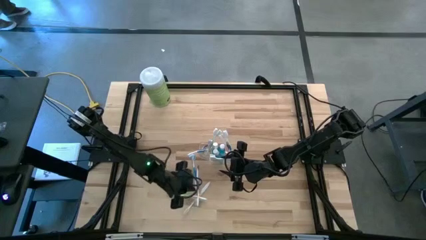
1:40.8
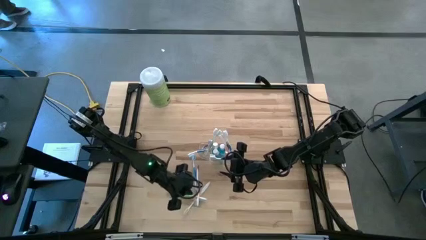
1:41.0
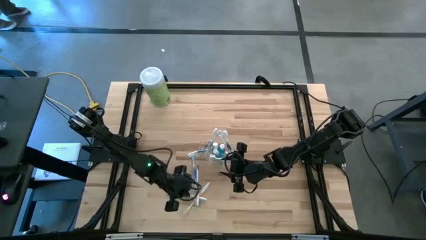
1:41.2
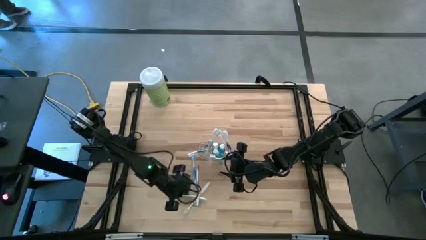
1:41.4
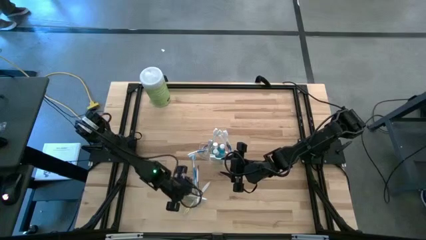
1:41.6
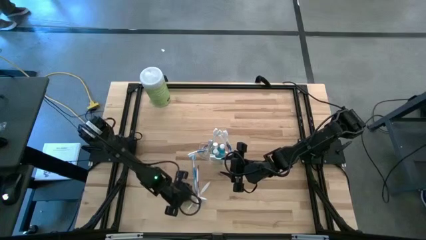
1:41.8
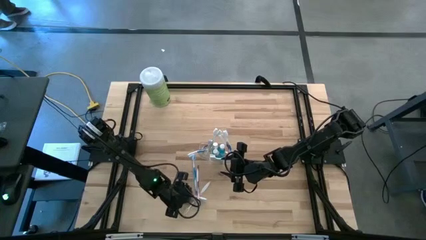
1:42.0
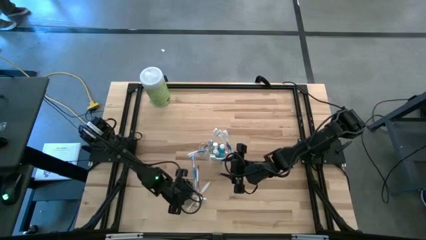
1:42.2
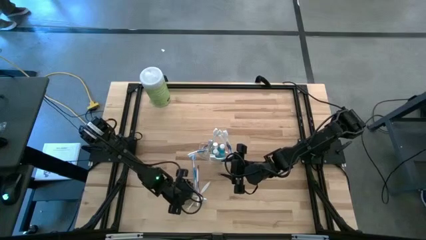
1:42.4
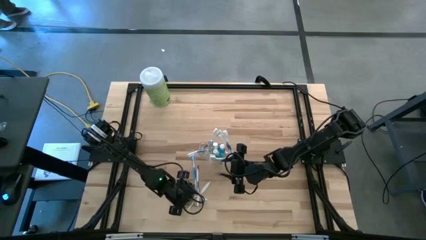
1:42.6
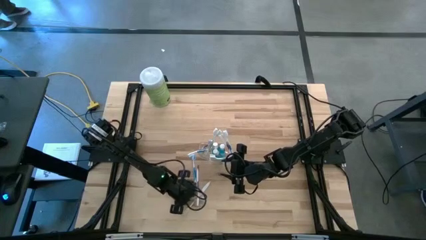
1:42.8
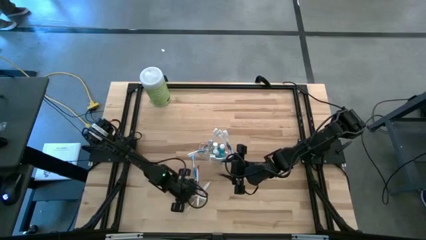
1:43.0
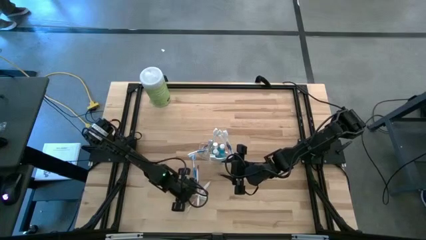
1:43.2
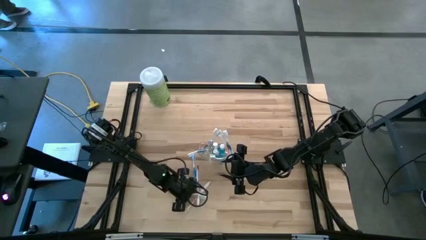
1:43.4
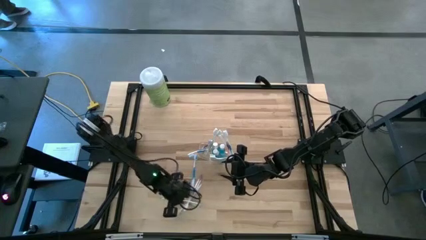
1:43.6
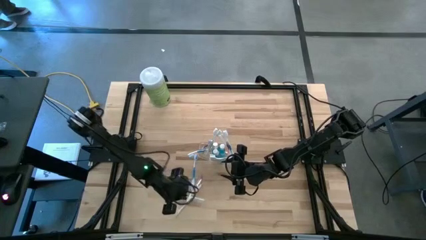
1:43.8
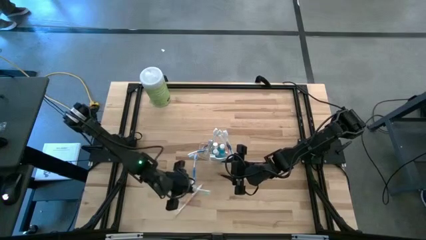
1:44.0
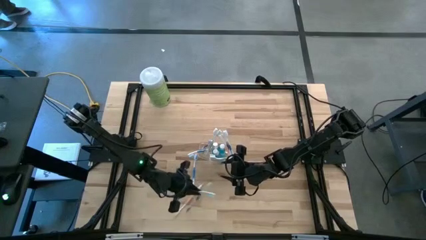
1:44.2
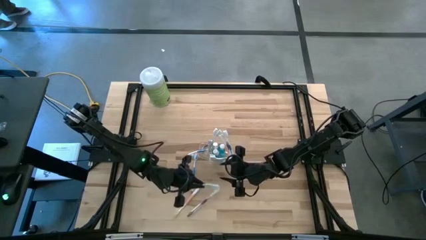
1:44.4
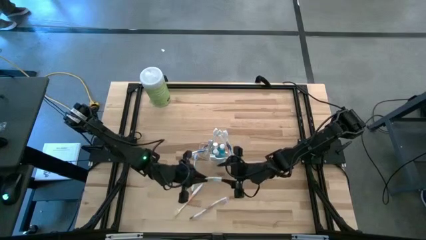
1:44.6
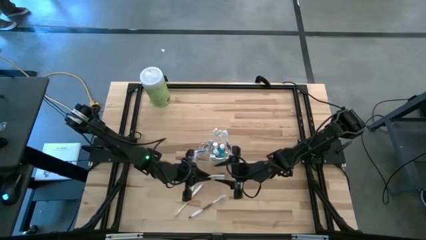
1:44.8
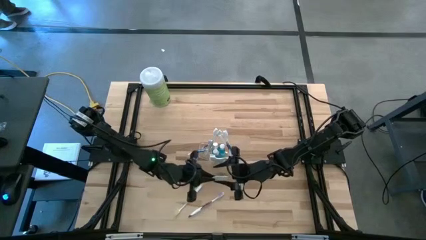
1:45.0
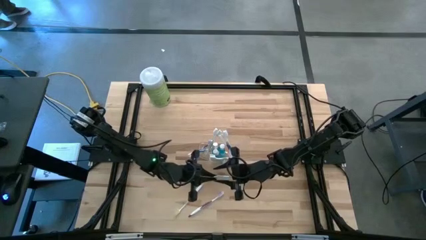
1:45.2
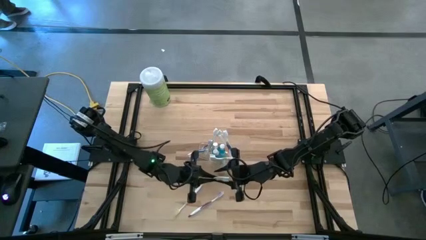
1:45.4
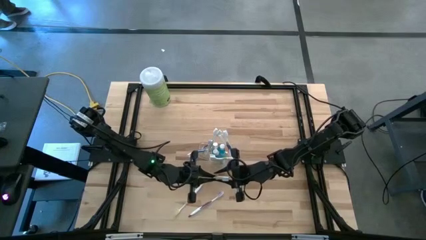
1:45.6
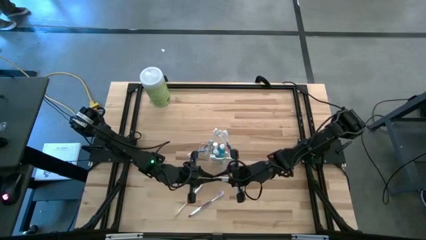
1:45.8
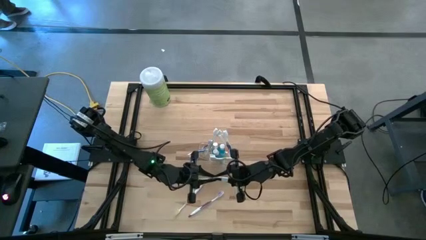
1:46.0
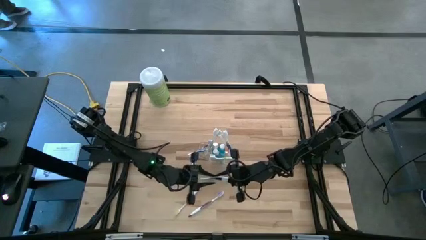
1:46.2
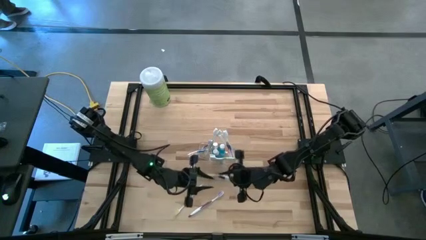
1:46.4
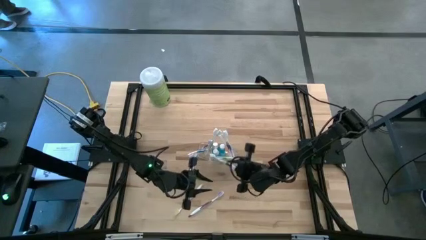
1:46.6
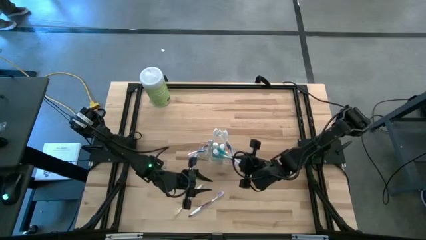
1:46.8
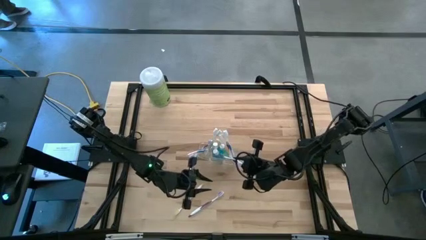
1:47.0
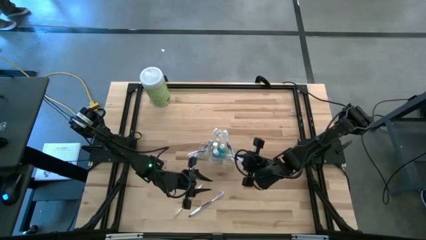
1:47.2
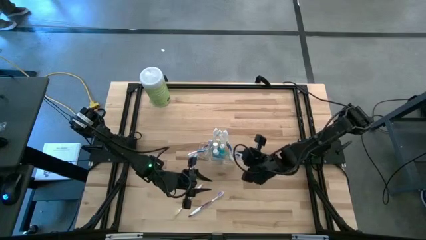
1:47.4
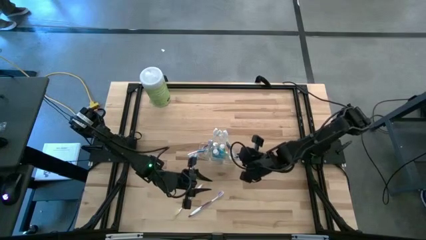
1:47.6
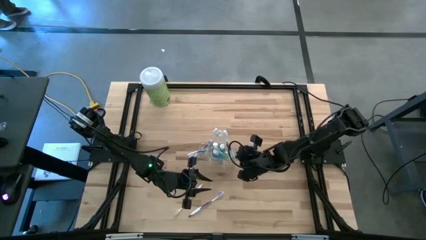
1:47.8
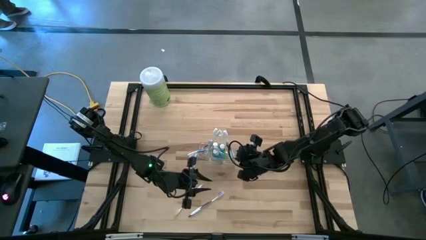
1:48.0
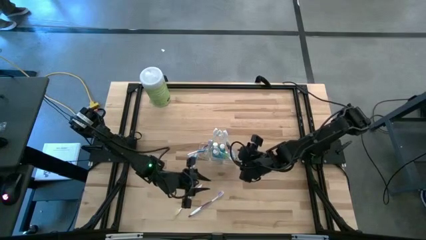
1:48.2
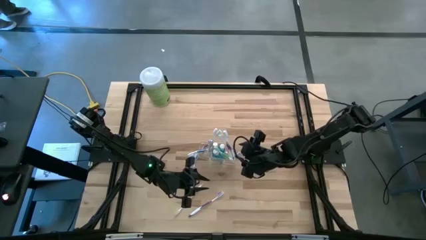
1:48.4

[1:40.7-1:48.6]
Task: Pick & Place toothbrushing station
Put the green toothbrush into the transparent organizer

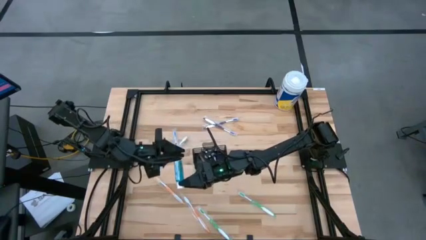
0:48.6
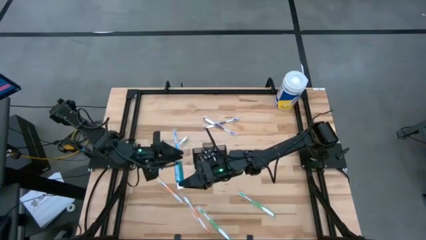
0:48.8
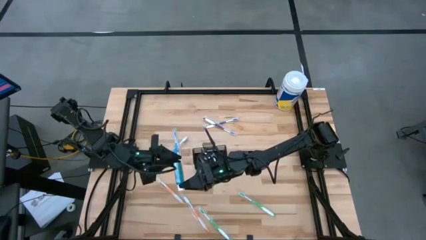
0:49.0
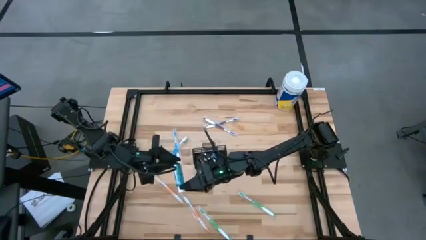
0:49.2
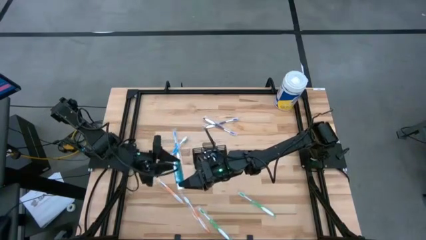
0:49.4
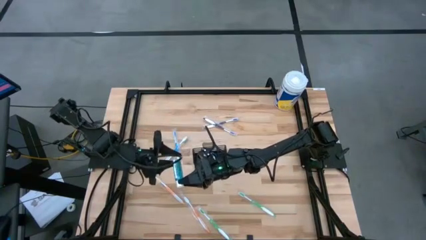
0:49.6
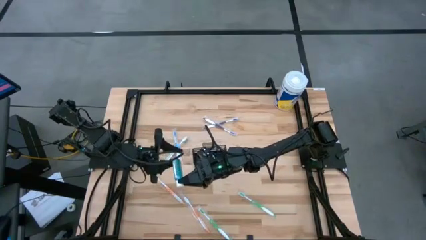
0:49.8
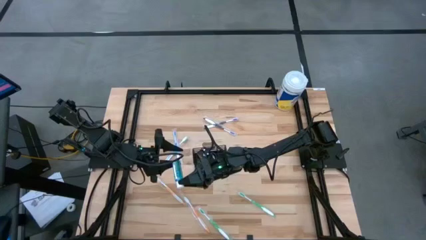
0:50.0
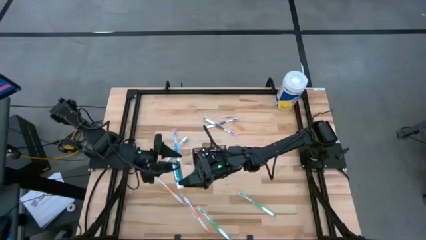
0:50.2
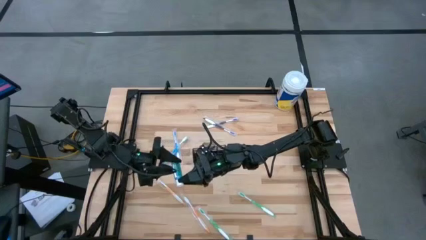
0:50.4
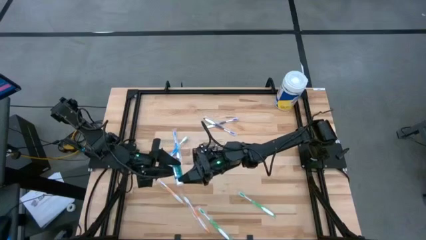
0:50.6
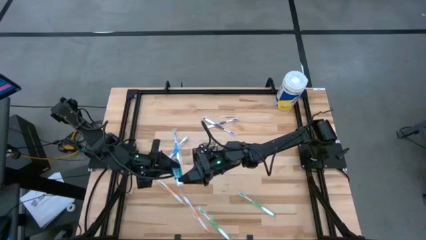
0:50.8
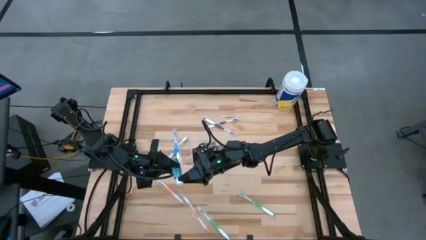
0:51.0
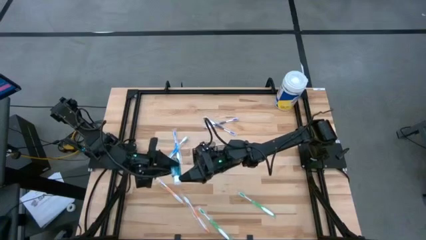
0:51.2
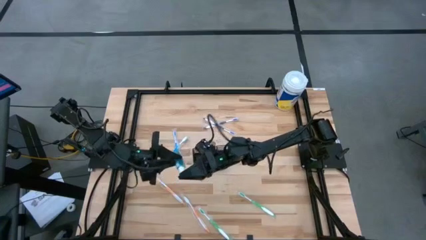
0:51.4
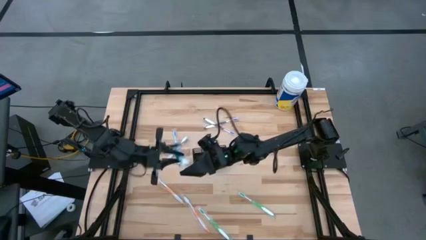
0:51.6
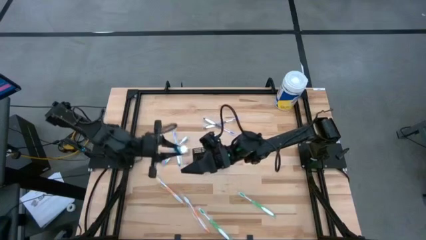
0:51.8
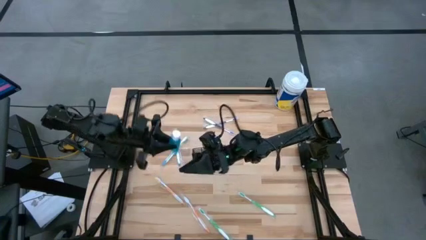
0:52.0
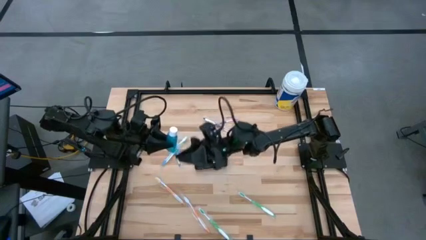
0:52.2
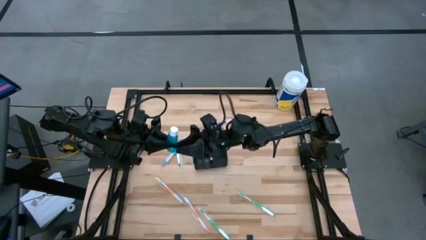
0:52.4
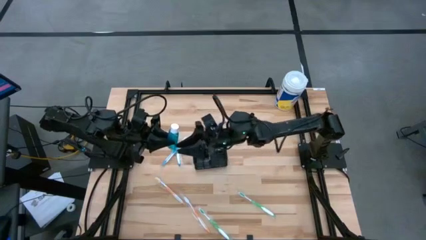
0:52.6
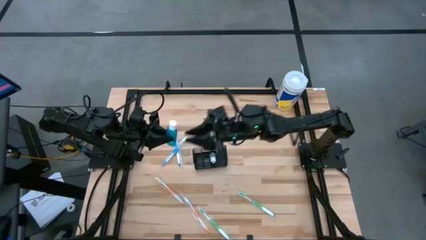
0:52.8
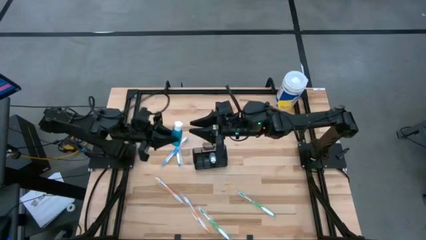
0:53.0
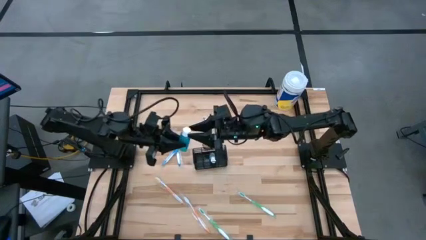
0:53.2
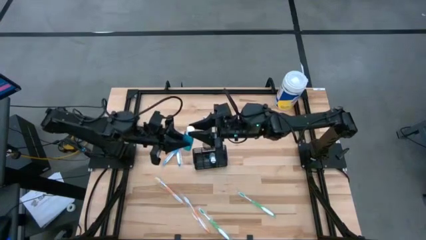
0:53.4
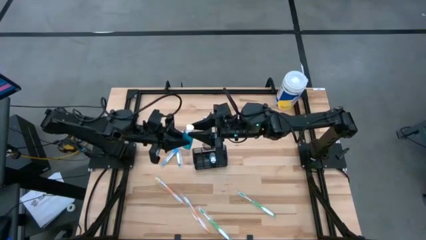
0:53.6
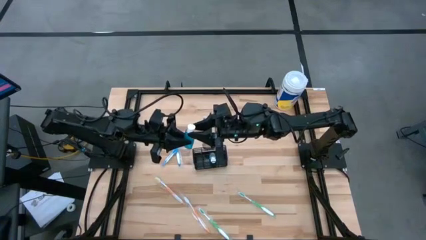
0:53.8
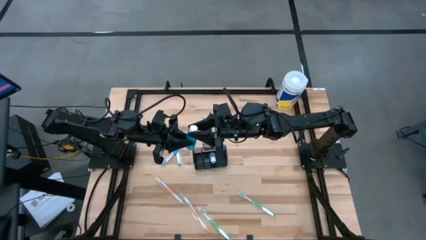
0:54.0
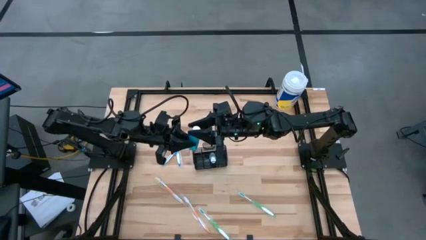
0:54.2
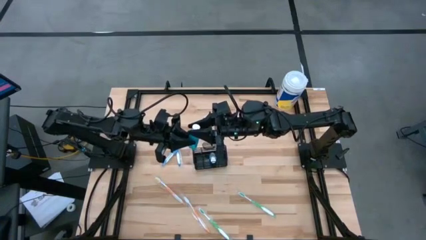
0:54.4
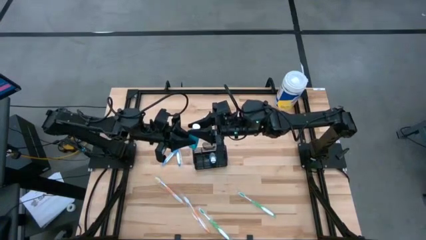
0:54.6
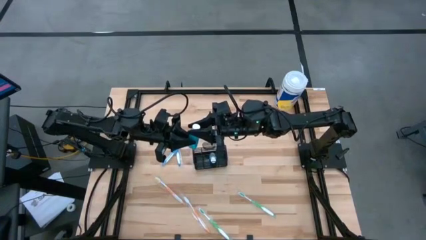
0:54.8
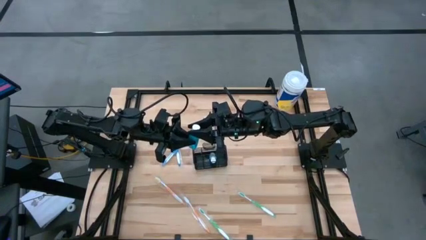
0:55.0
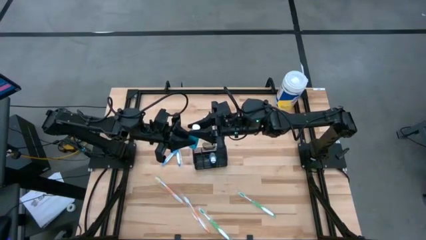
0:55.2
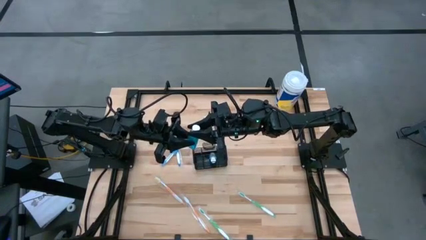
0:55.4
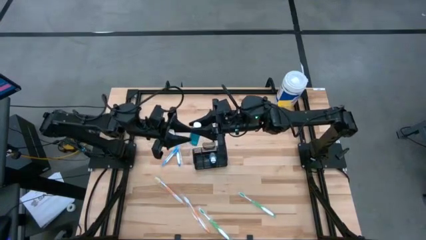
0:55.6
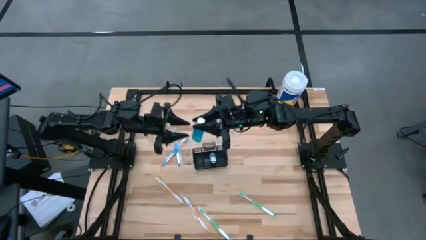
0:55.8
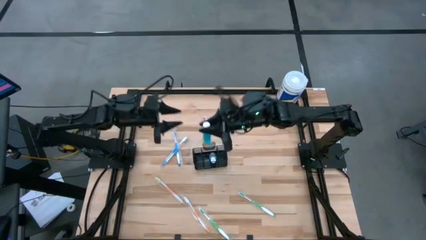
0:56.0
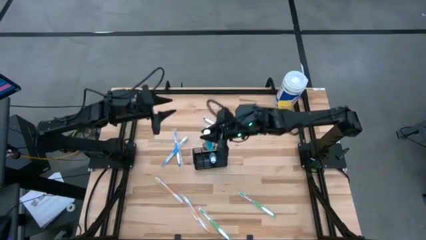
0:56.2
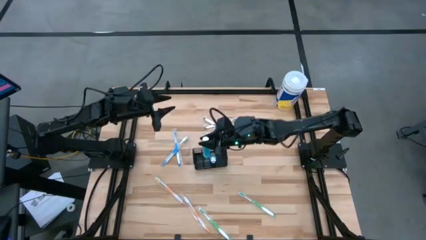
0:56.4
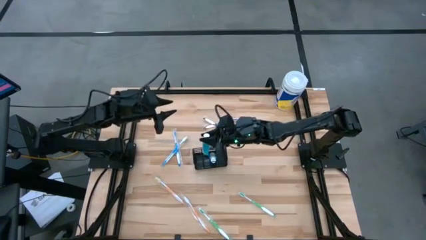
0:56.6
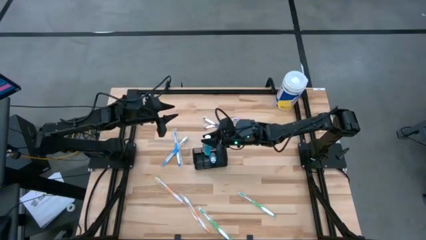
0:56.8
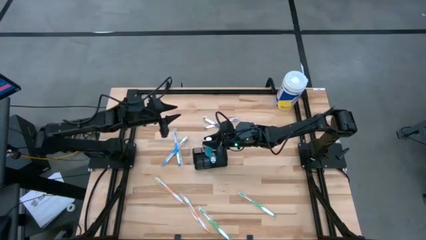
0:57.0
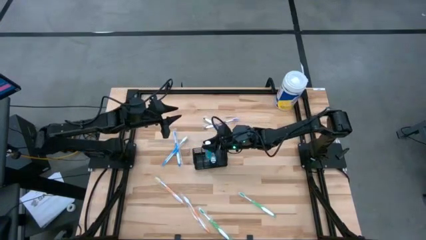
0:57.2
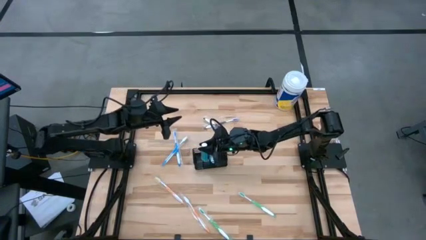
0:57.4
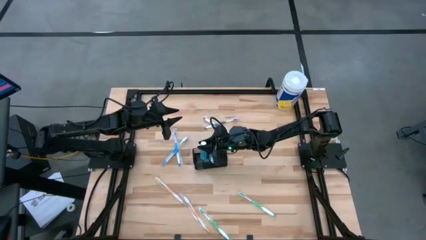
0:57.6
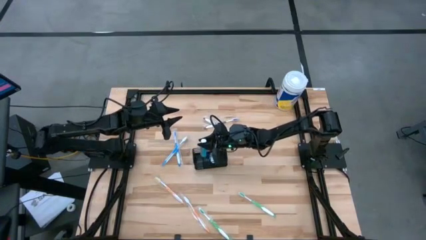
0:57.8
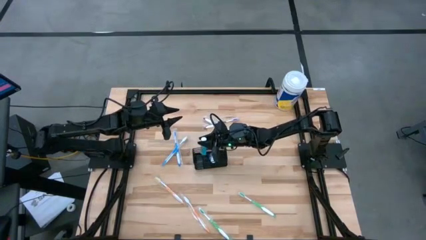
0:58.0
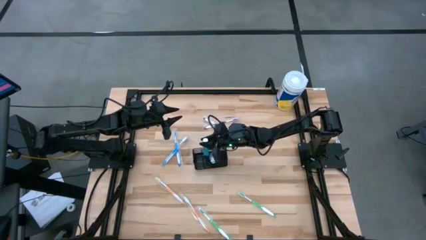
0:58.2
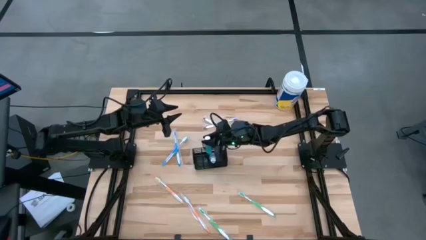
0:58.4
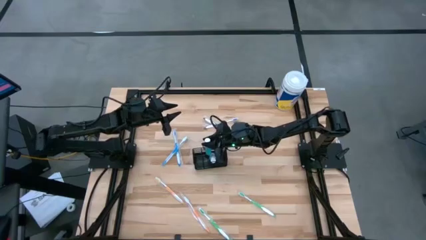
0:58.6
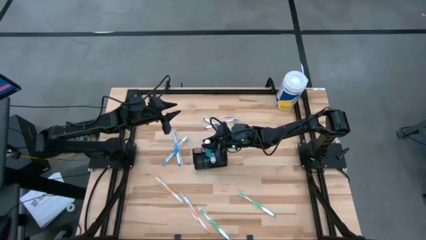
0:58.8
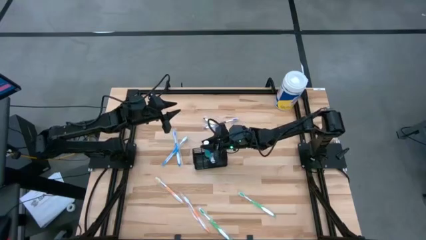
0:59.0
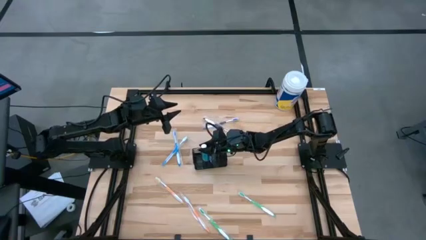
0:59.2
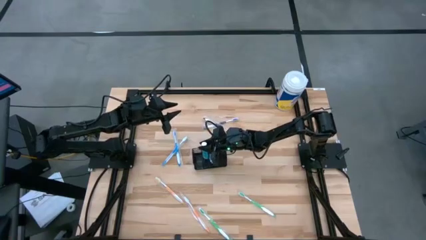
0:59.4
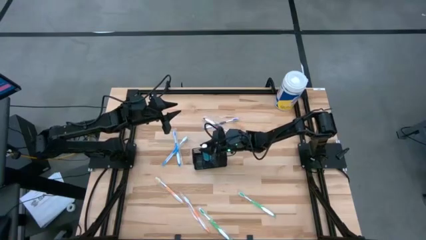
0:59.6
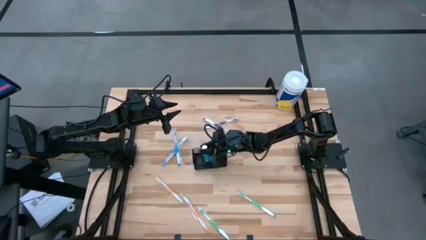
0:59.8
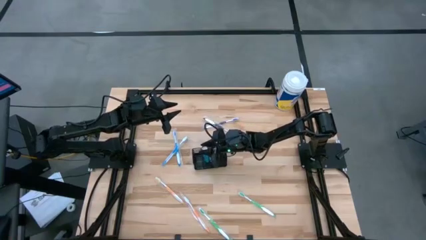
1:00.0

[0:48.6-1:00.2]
Task: Pick & Place toothbrushing station
Put the blue mouthwash into the mesh organizer
